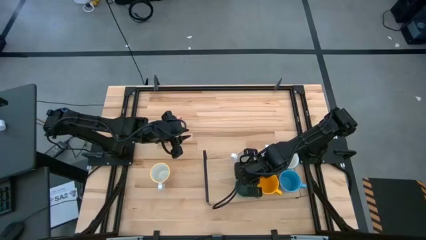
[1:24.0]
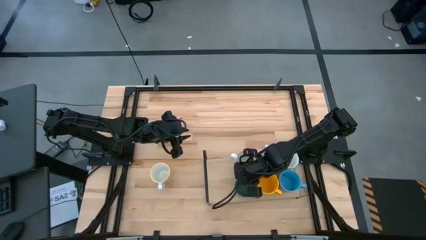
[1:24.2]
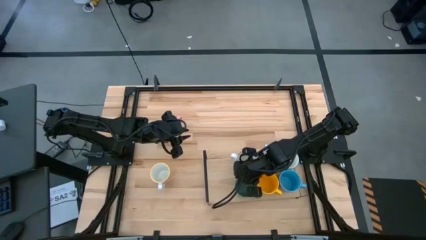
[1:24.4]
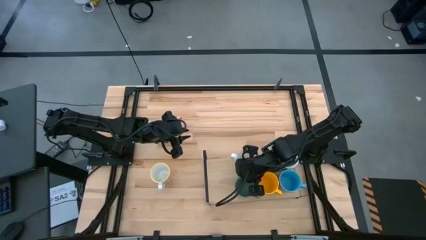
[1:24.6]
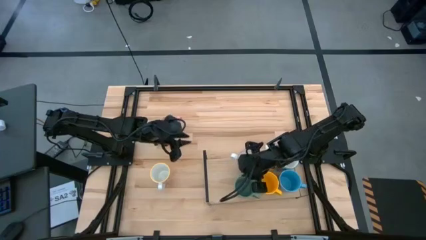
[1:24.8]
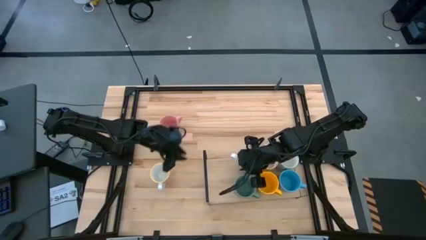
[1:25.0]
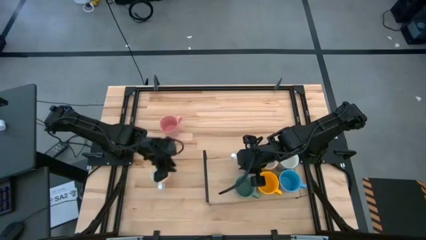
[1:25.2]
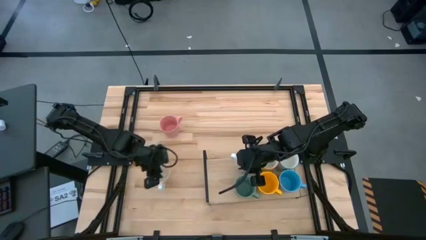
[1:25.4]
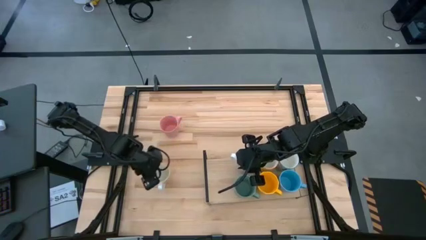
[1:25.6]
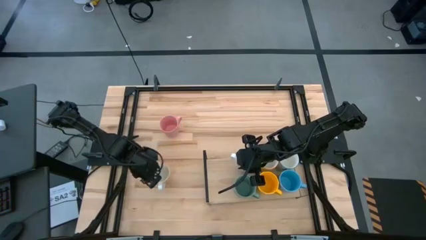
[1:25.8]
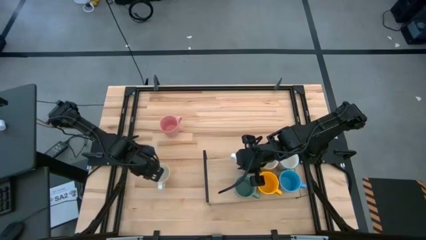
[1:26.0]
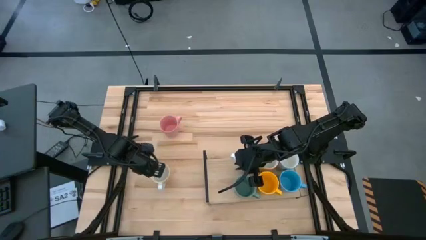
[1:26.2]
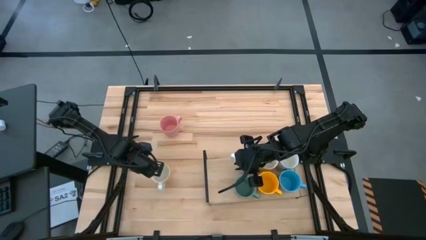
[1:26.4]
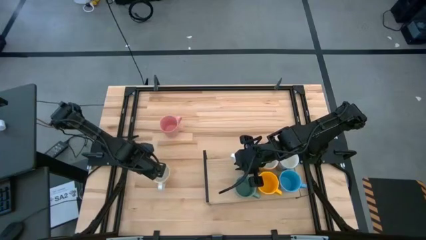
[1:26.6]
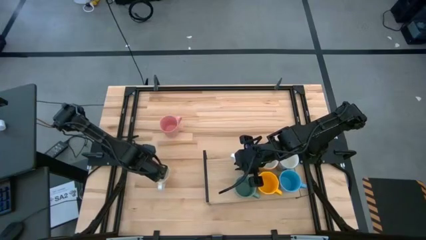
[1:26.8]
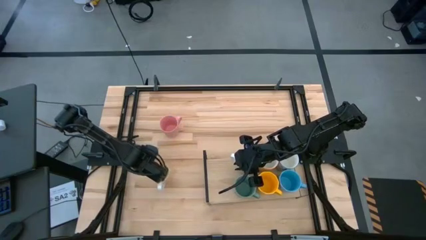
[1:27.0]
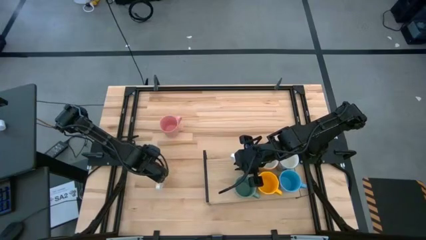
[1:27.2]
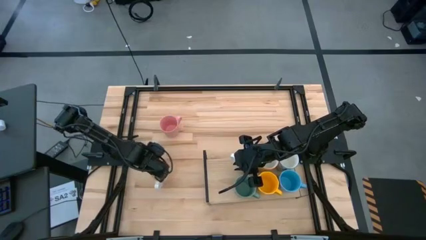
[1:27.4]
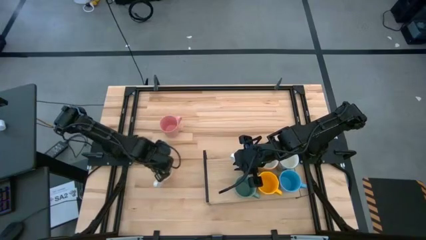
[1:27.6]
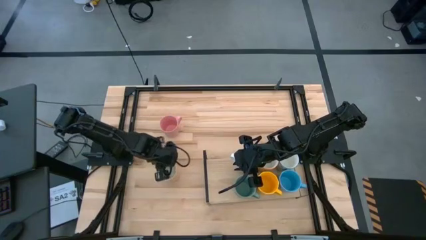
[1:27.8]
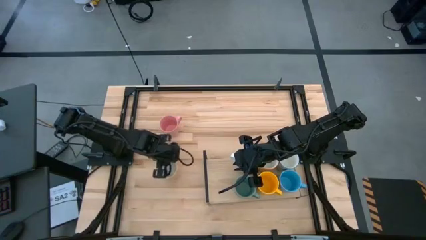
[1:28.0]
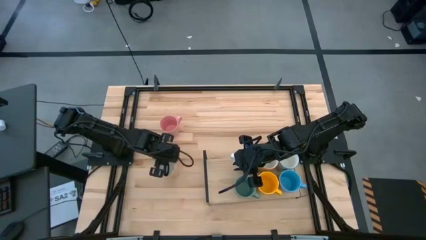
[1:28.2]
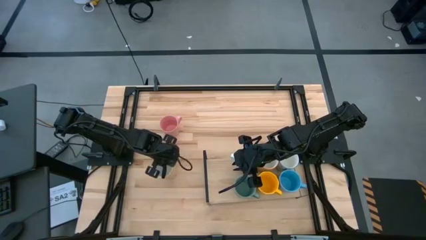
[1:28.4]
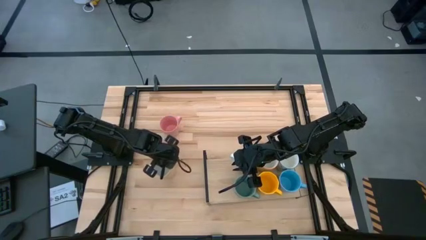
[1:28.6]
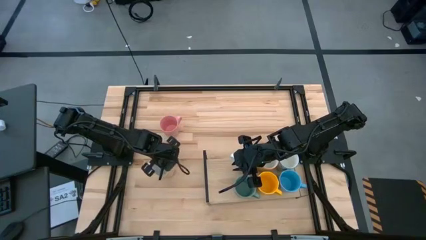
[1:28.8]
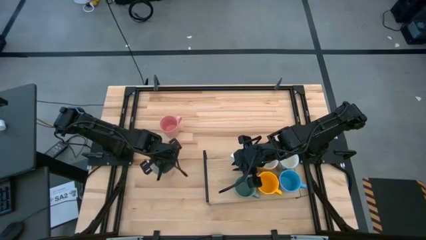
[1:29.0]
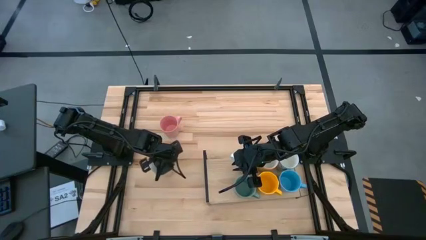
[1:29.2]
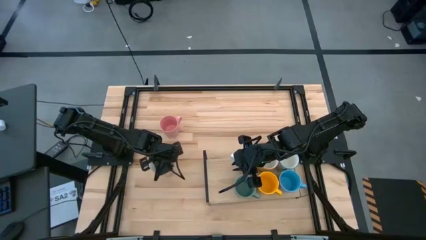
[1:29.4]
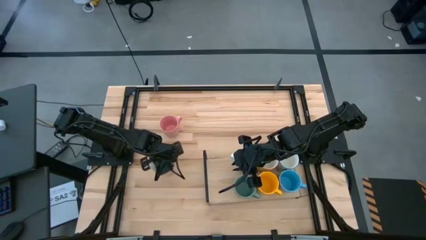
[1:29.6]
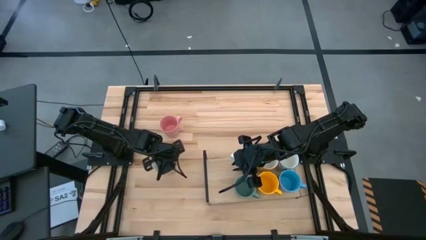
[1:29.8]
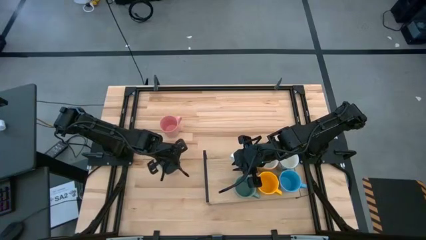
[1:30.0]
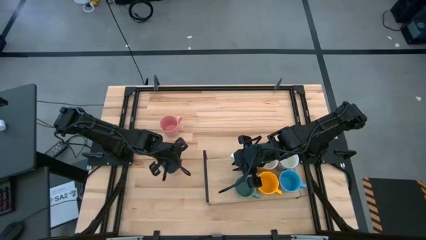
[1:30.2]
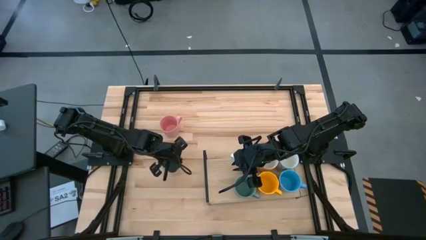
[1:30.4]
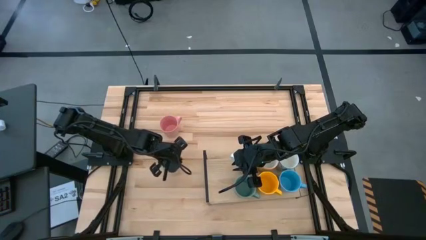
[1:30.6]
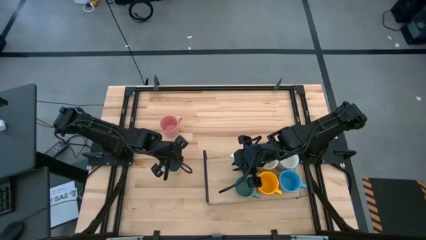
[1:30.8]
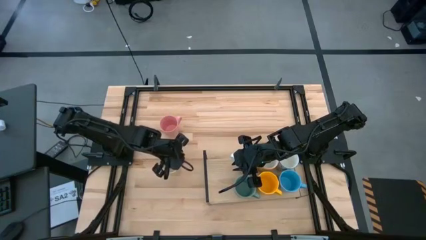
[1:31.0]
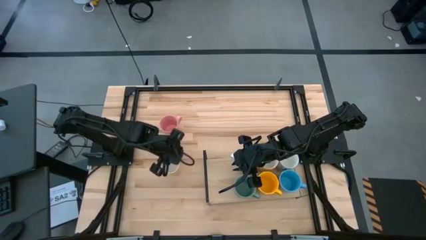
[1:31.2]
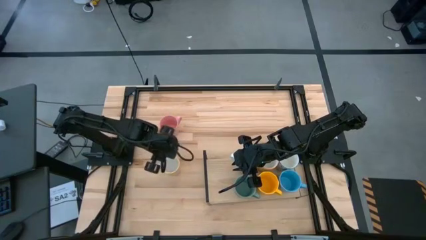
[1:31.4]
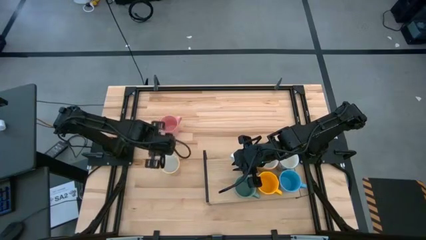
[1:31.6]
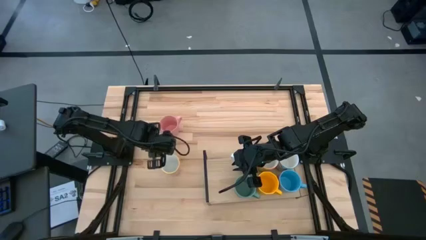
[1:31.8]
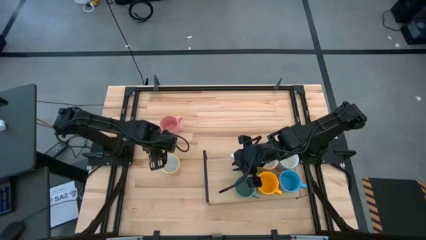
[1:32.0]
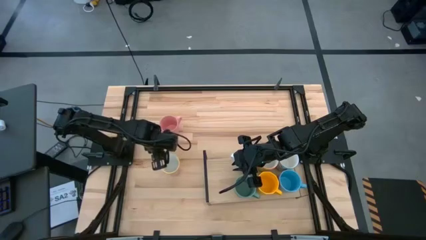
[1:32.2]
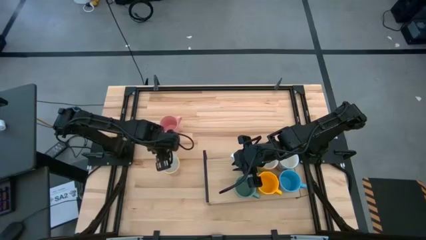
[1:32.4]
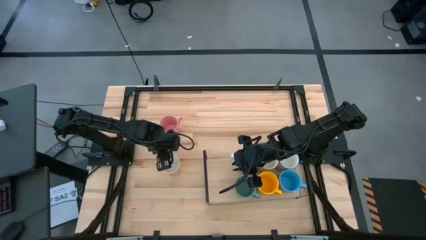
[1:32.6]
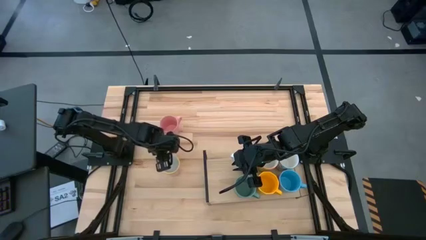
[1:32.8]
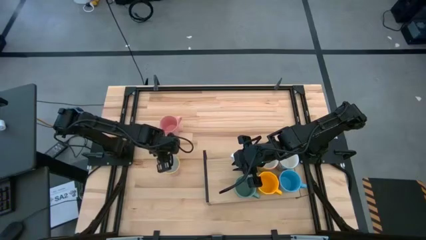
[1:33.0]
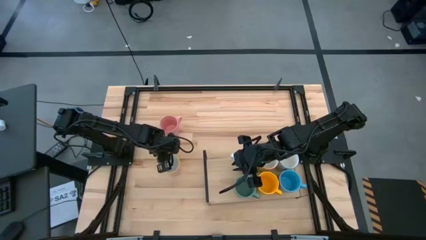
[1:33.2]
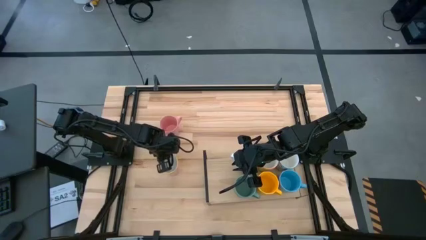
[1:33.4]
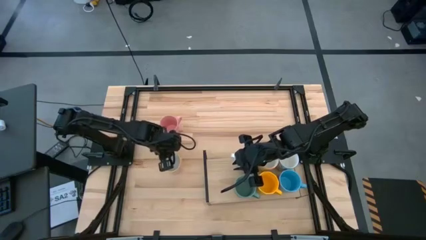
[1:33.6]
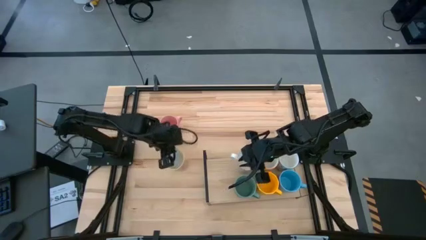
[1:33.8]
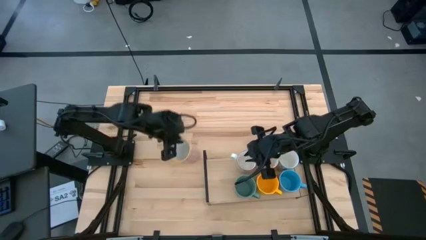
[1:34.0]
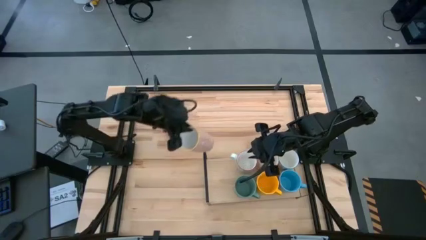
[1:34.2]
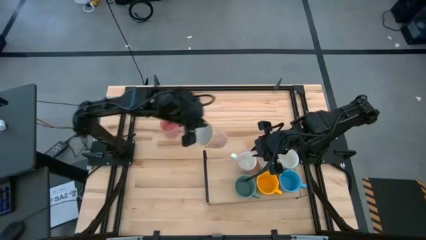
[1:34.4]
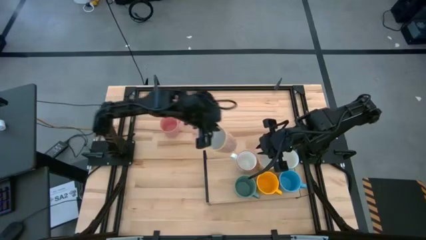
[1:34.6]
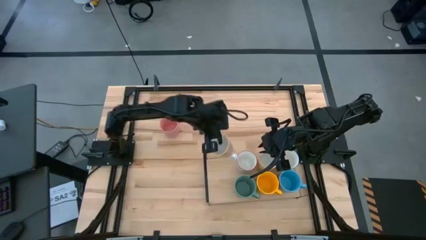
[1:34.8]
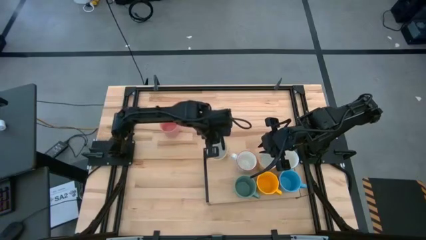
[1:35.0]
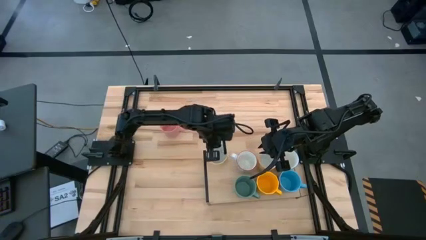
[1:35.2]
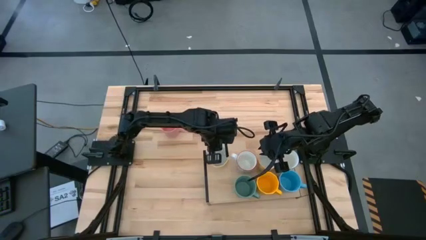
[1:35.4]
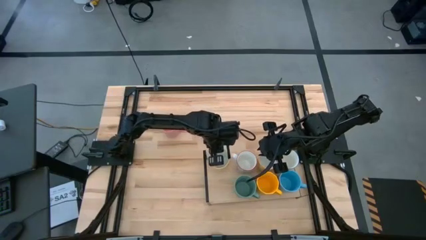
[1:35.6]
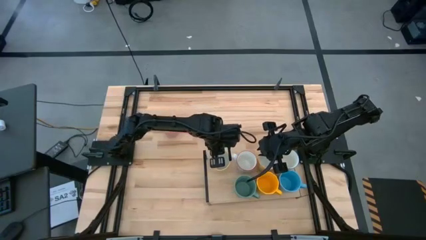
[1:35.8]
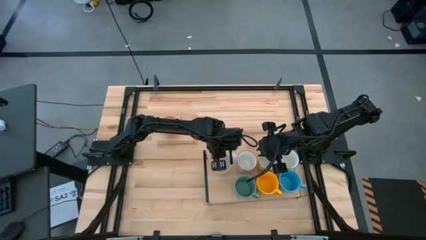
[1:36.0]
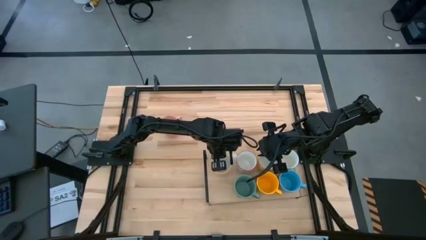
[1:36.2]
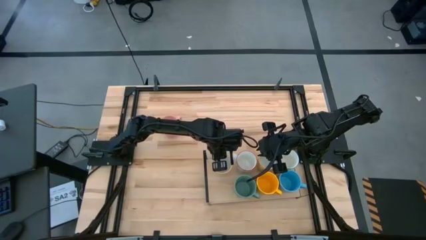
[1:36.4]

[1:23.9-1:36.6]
Task: Place coffee mugs
Put the pink patterned mug on the shelf

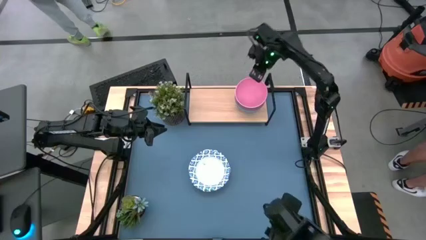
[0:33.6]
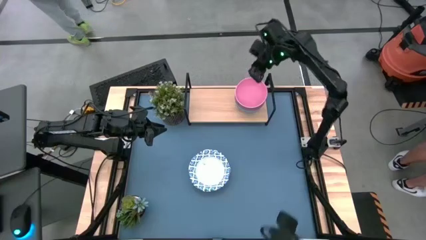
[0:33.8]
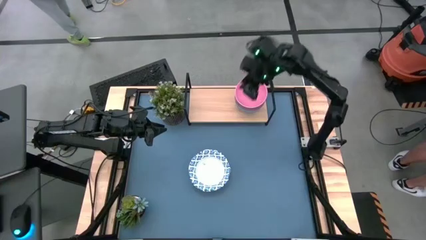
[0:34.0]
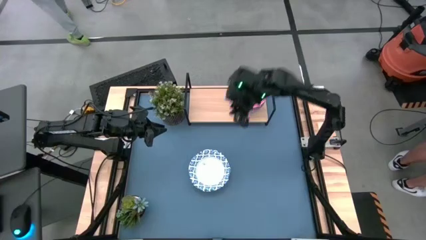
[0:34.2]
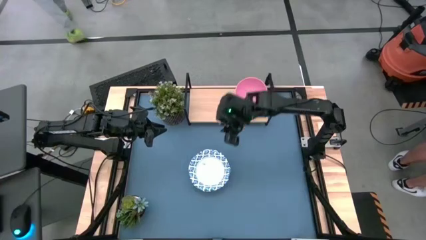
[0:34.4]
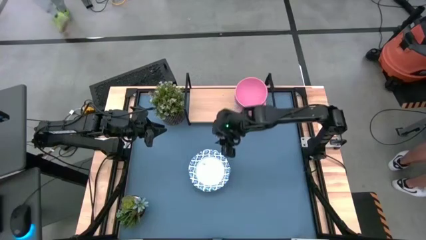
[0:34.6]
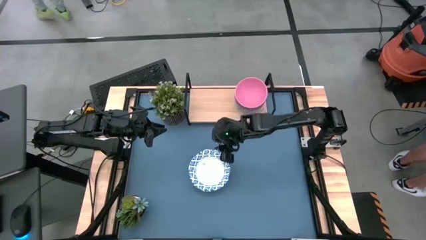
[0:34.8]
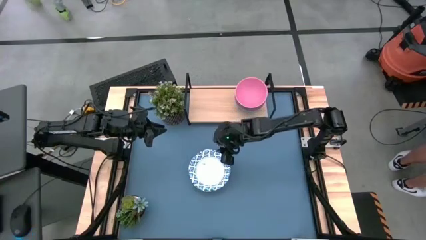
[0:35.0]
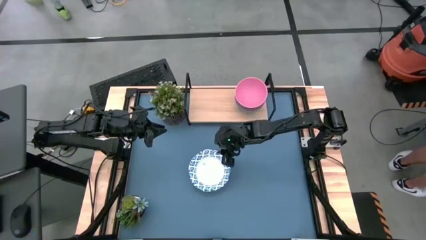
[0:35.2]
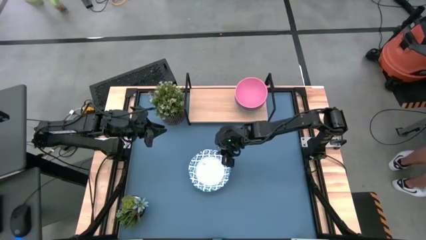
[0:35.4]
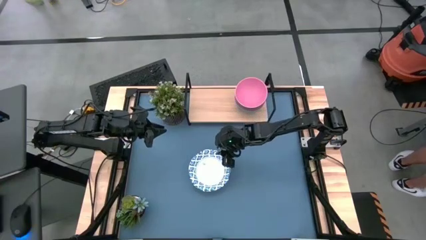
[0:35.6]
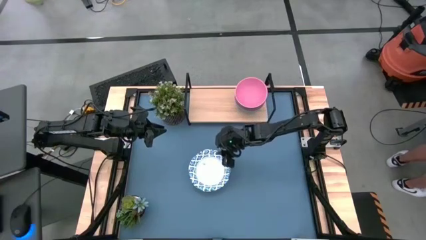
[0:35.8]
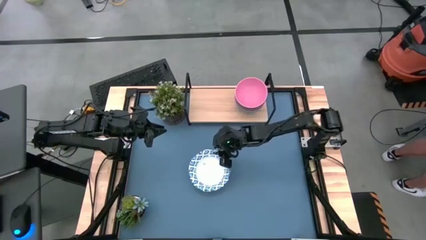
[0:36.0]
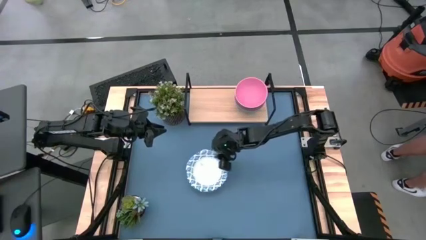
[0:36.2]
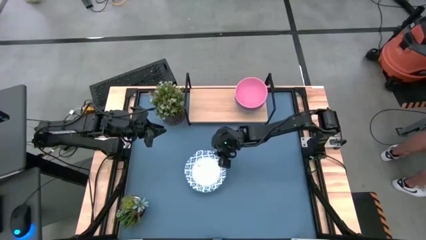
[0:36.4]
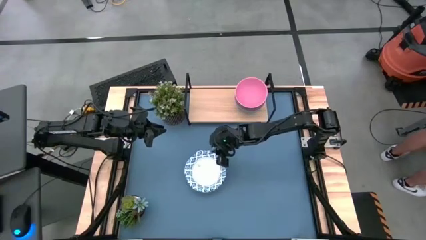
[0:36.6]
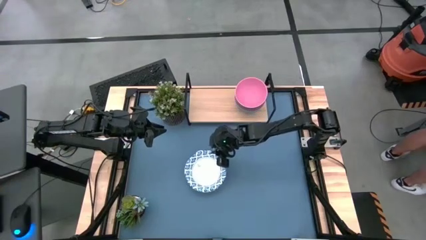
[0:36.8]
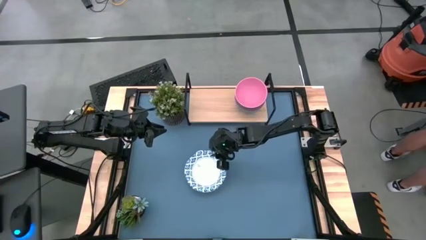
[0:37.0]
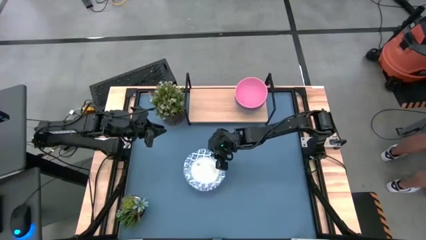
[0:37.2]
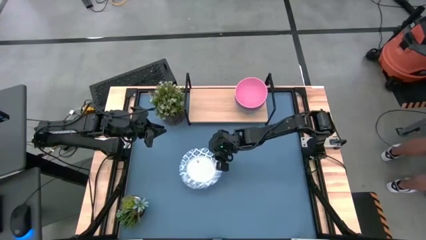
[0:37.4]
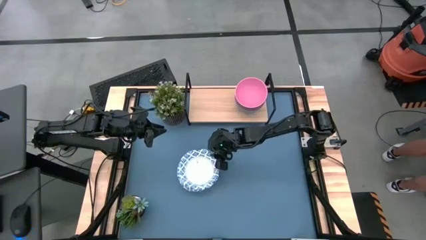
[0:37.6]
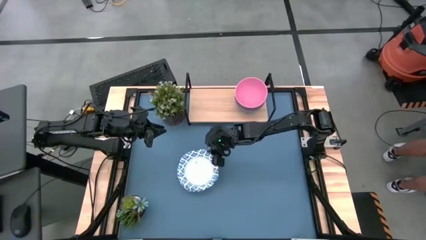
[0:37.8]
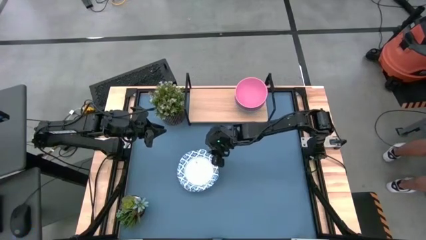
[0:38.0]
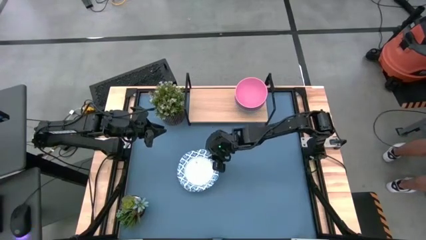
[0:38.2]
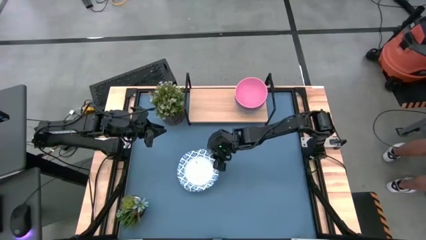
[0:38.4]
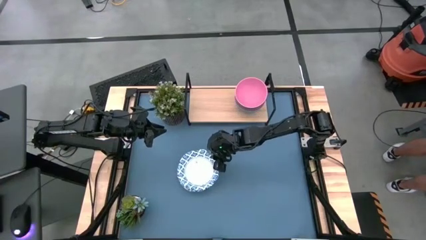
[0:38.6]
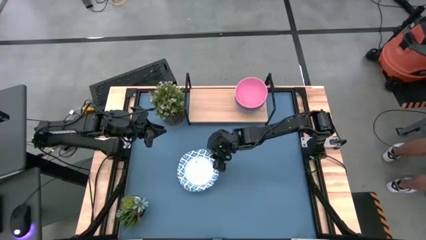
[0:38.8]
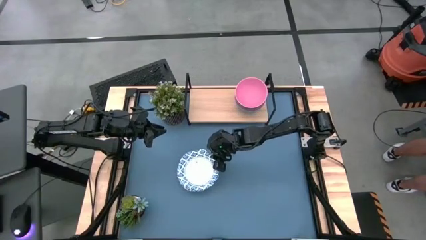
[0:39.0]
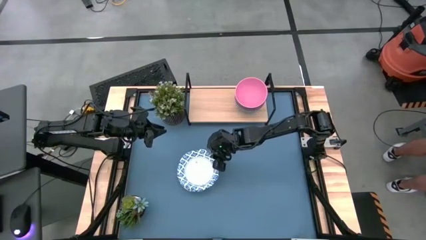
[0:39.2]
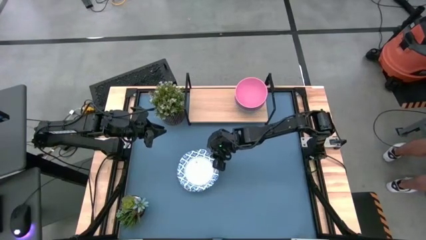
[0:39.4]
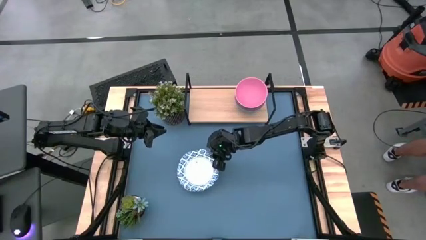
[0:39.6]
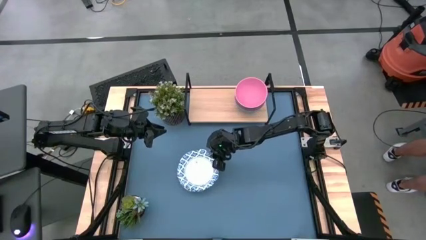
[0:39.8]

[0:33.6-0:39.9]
Task: Place and stack bowls onto a shelf
Put the blue patterned bowl on the shelf
